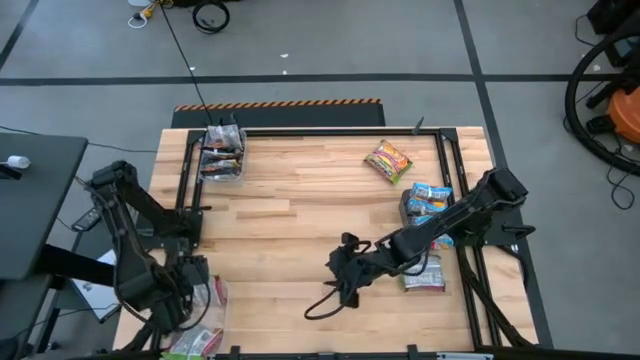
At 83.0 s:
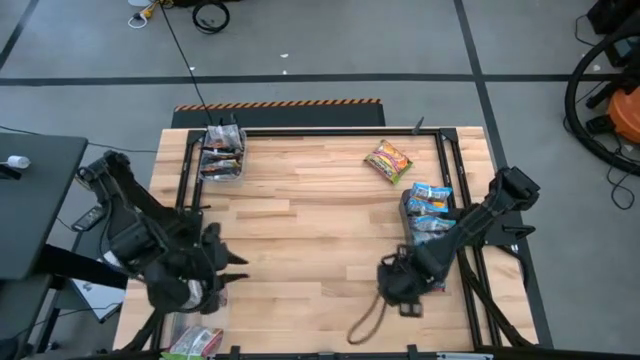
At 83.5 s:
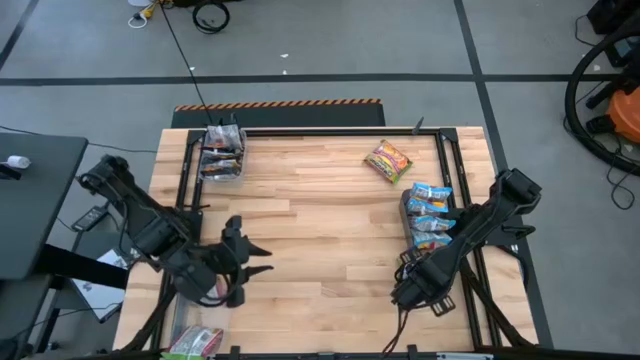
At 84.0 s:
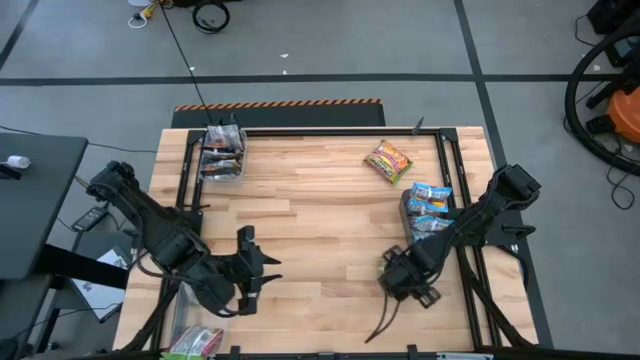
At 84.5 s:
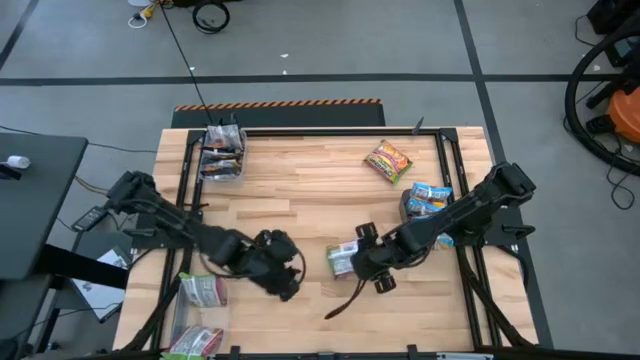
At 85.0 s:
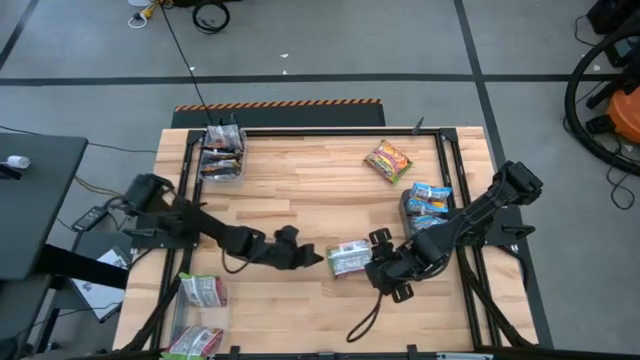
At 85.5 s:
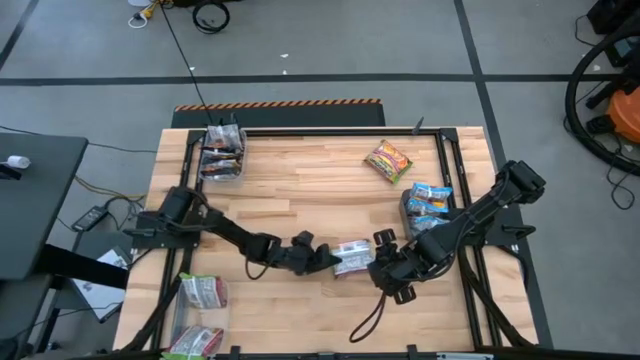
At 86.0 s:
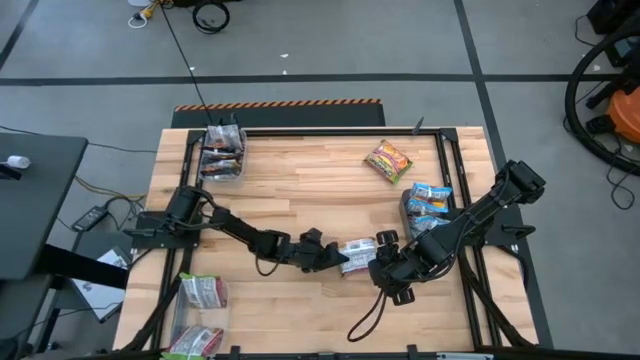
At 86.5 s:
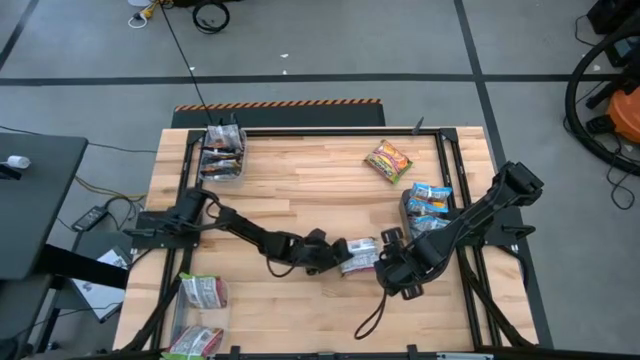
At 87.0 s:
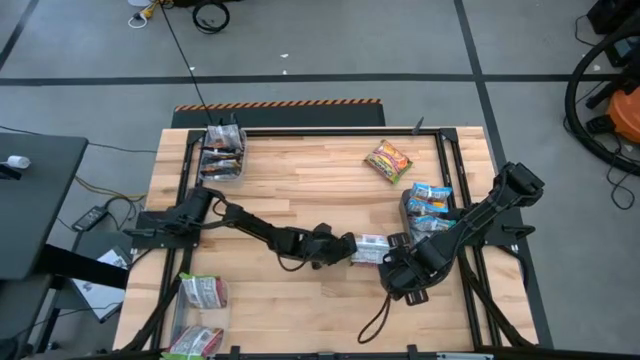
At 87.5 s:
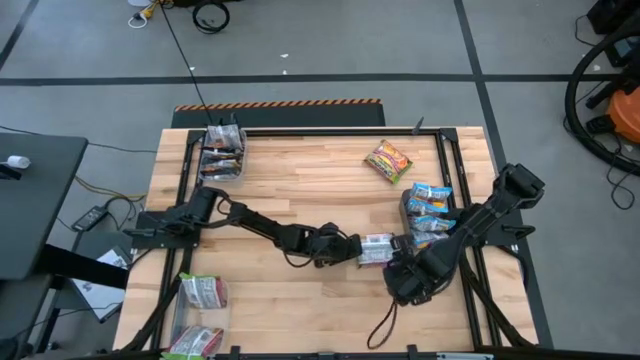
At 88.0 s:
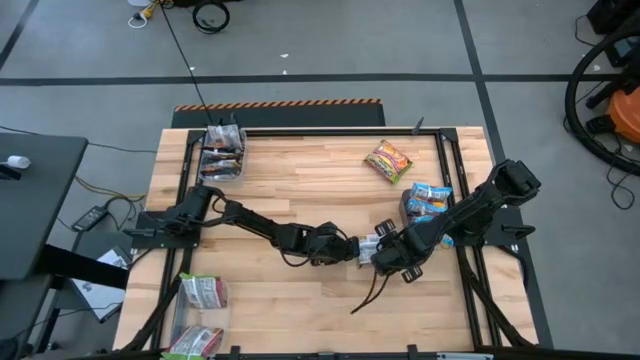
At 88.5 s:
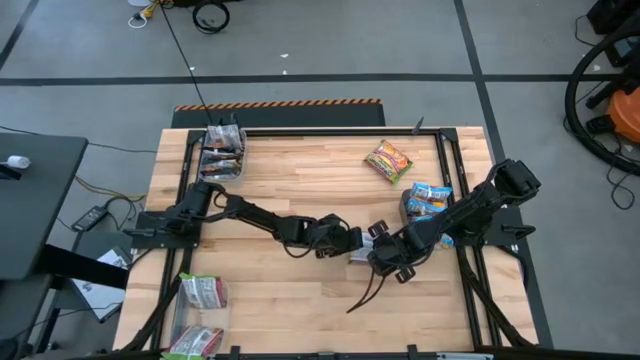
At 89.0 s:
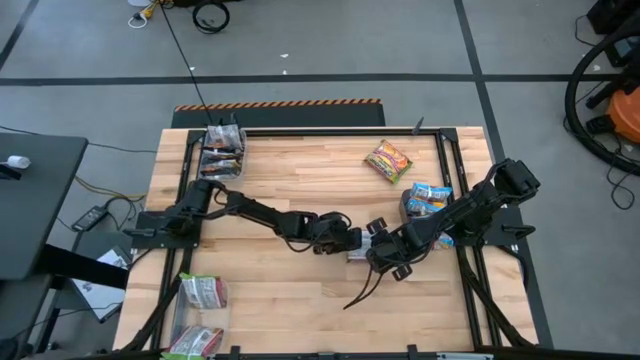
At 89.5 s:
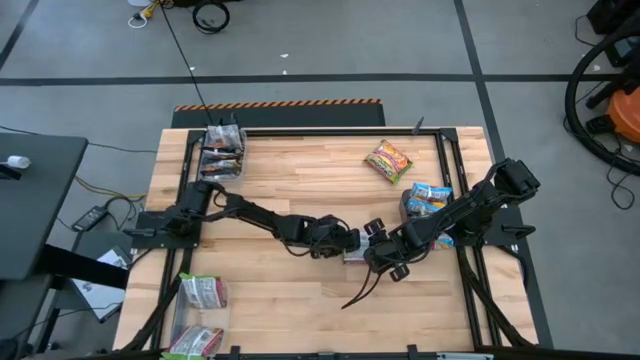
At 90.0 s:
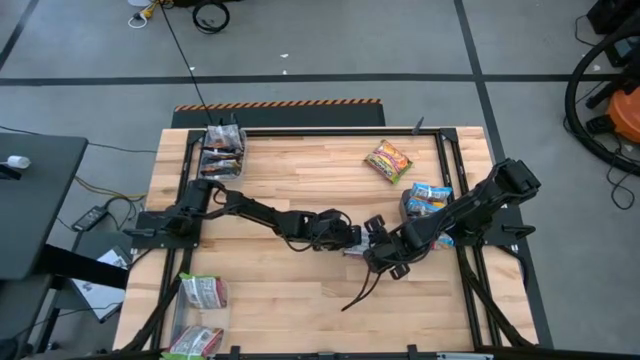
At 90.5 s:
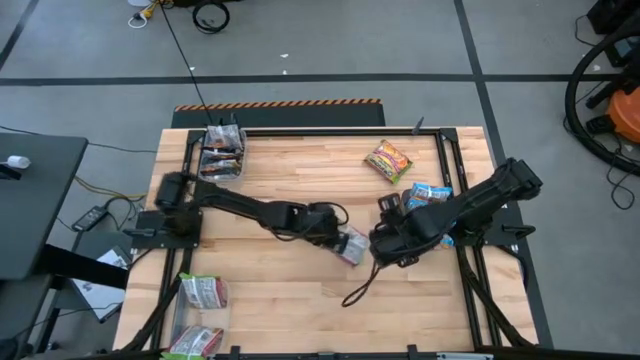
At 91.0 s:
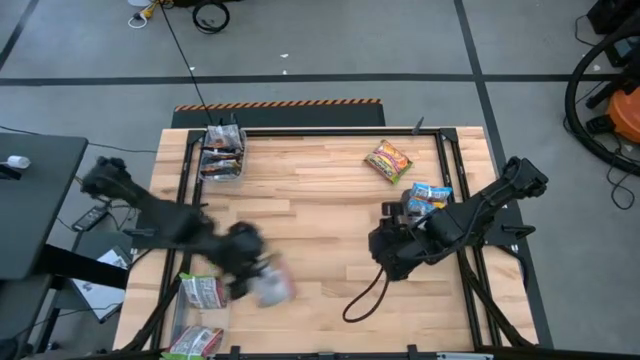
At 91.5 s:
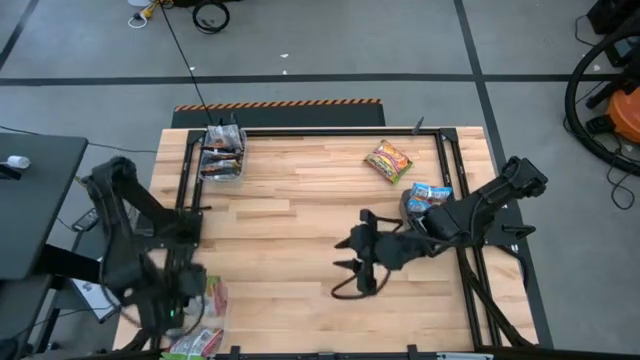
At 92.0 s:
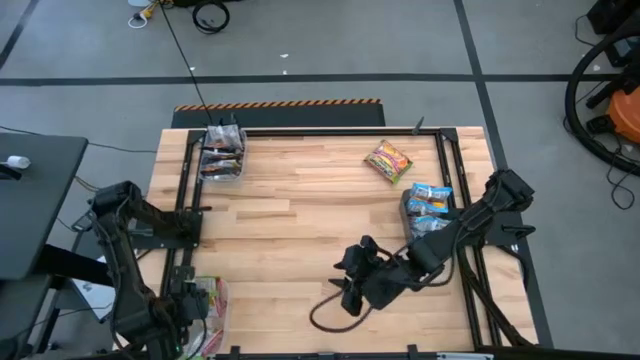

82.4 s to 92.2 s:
Task: Sort Maruchan noodles
Put the green noodle pack into the bottom transparent bin

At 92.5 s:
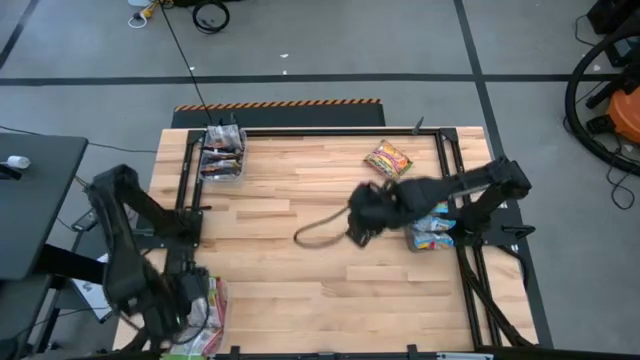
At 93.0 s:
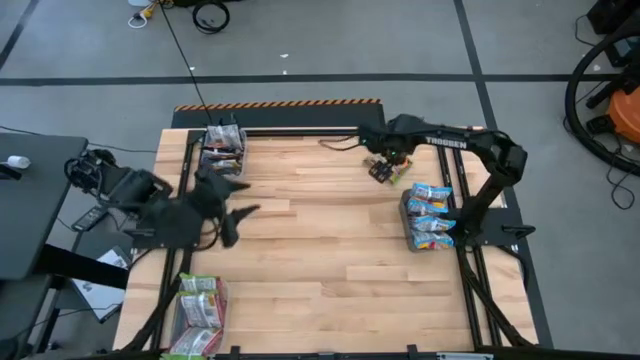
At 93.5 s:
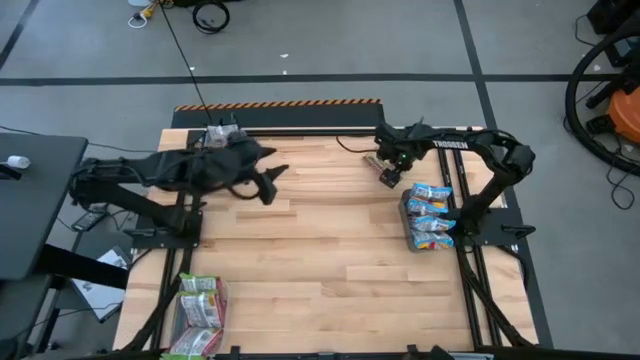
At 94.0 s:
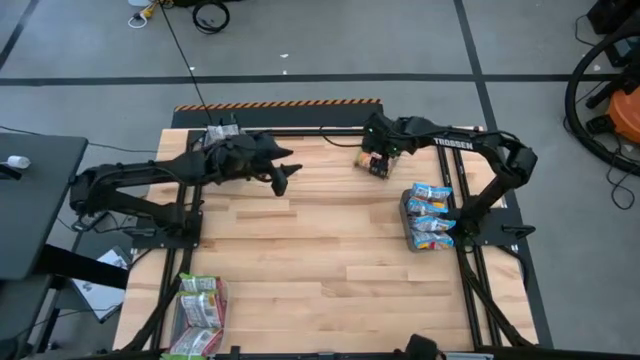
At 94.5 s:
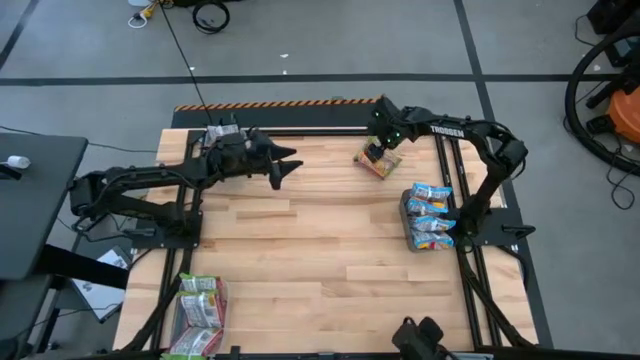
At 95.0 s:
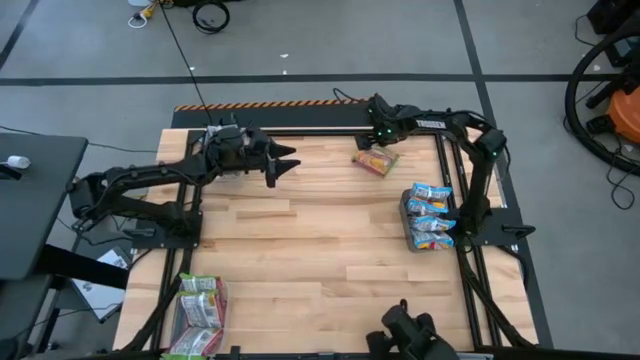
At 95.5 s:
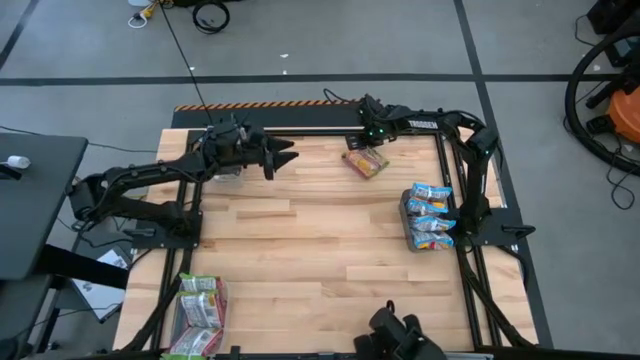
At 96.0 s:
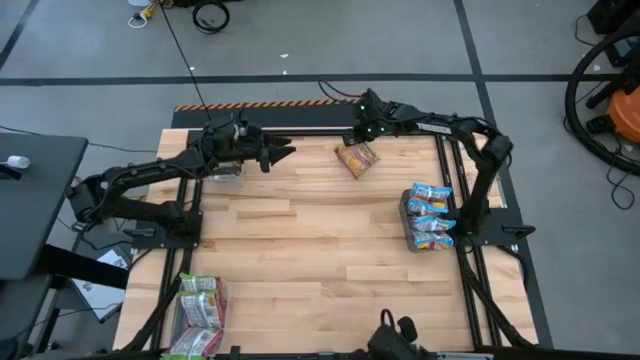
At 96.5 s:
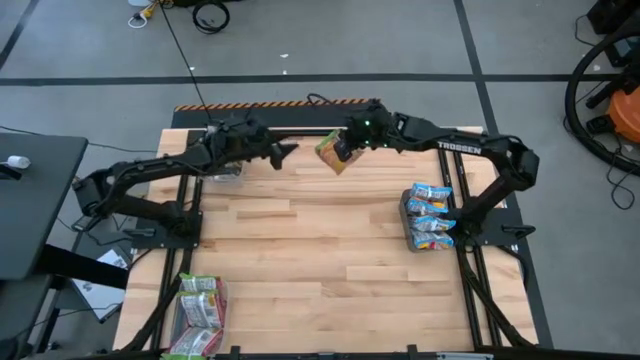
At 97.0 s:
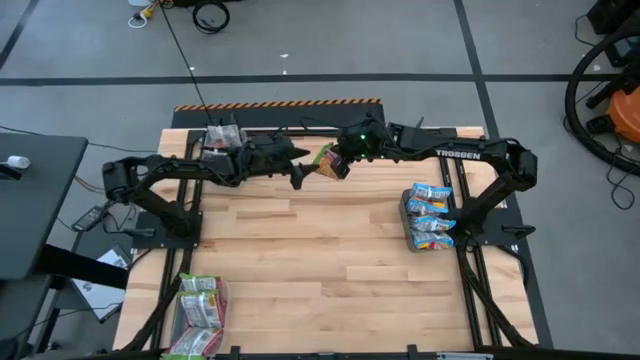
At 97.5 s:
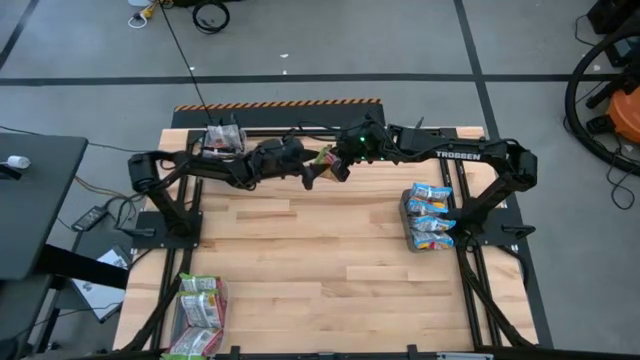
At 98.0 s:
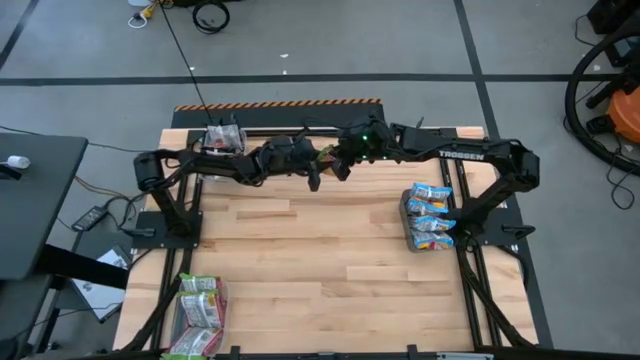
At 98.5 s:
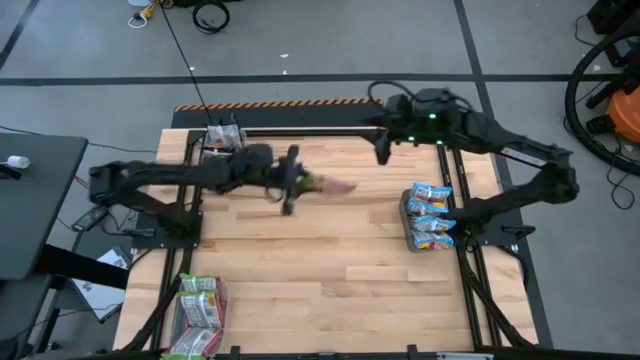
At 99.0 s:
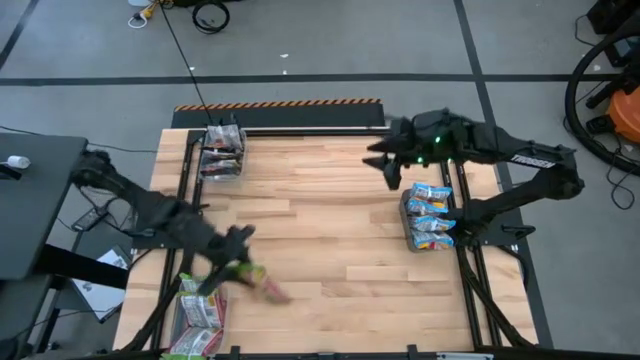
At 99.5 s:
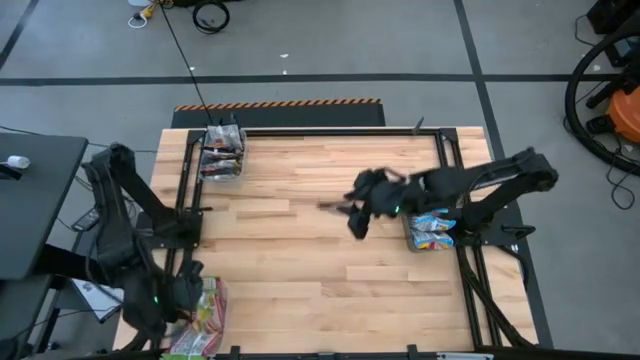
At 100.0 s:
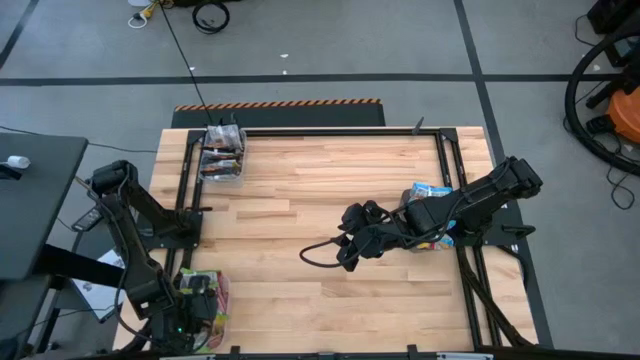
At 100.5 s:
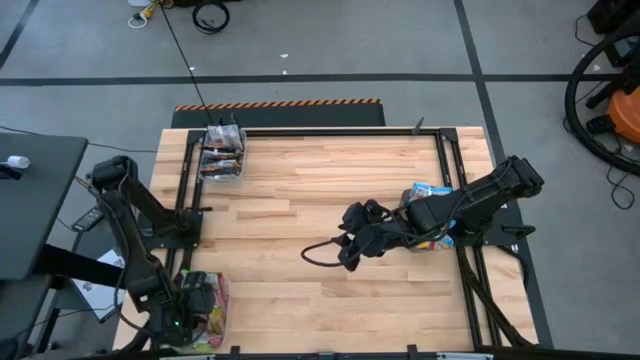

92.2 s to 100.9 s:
Put the green noodle pack into the bottom transparent bin

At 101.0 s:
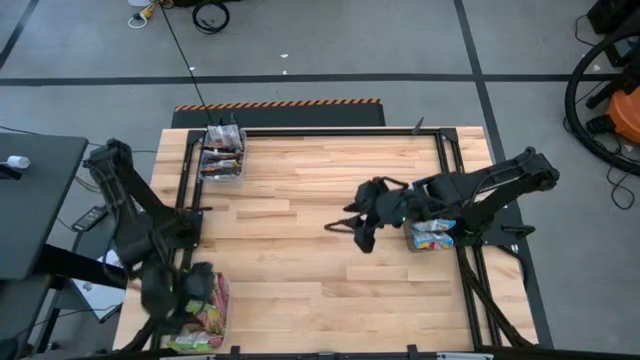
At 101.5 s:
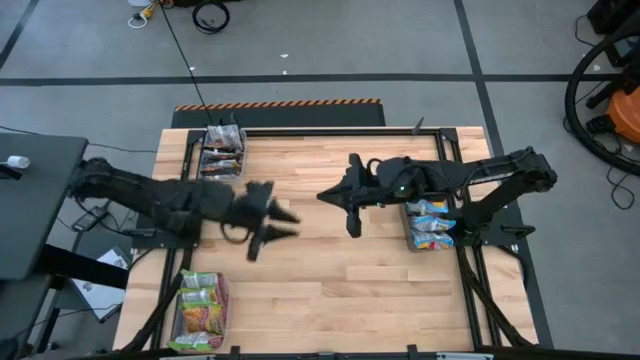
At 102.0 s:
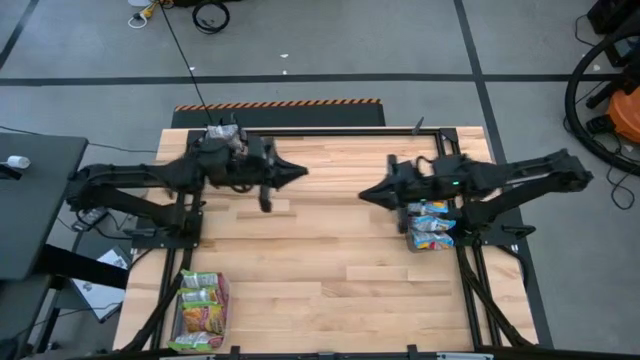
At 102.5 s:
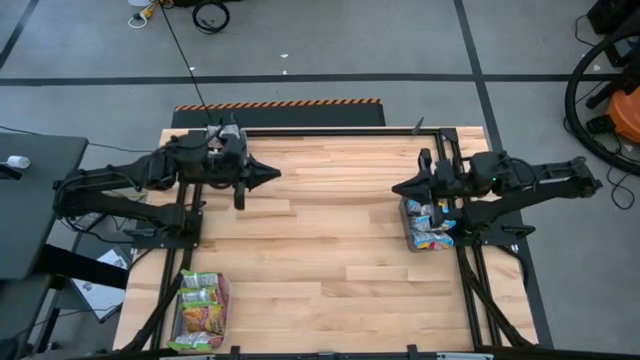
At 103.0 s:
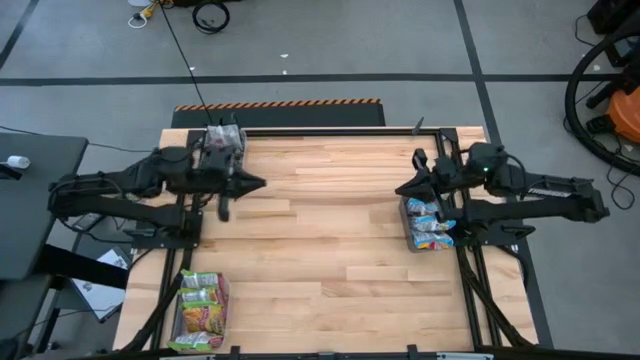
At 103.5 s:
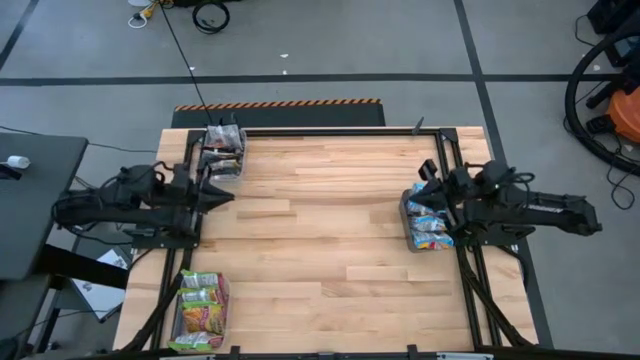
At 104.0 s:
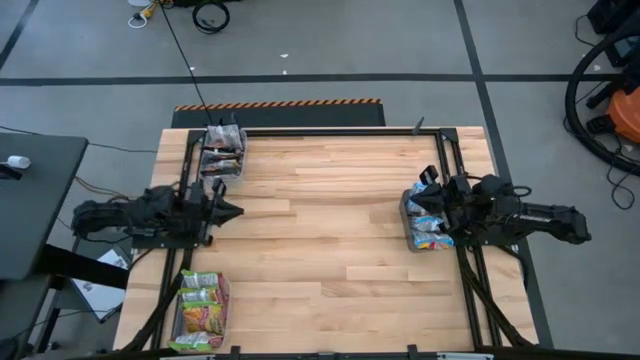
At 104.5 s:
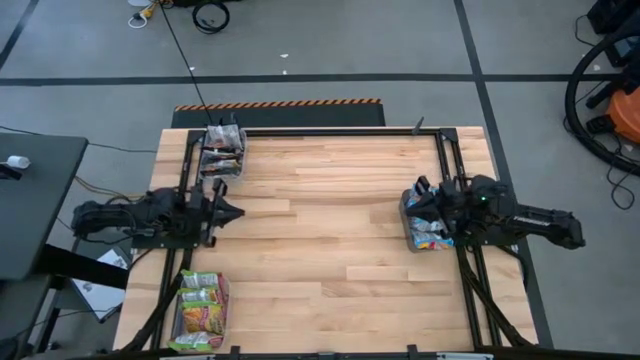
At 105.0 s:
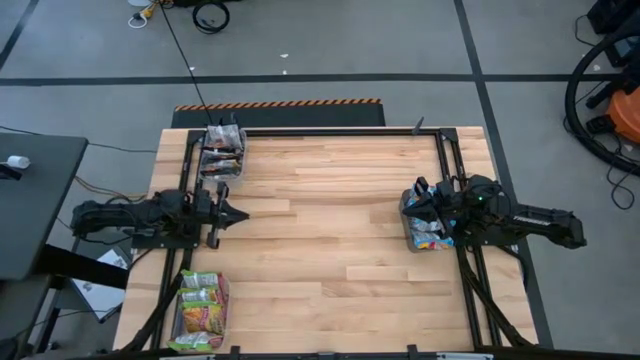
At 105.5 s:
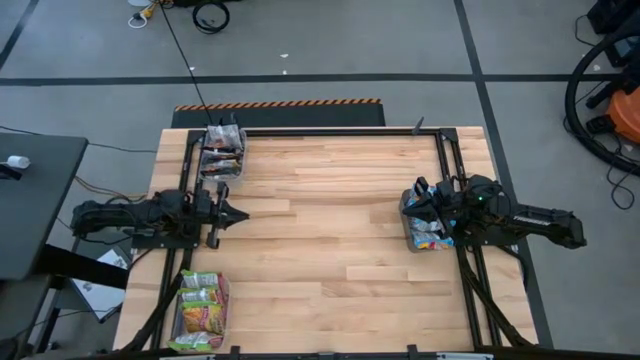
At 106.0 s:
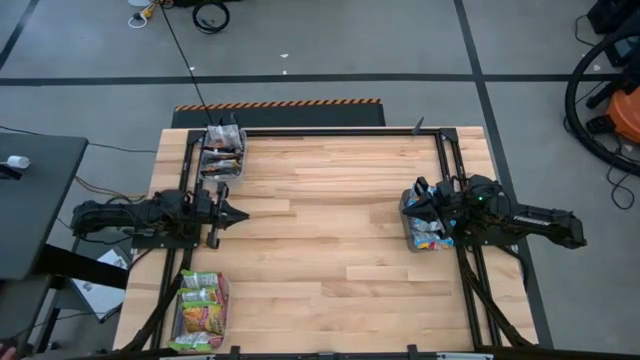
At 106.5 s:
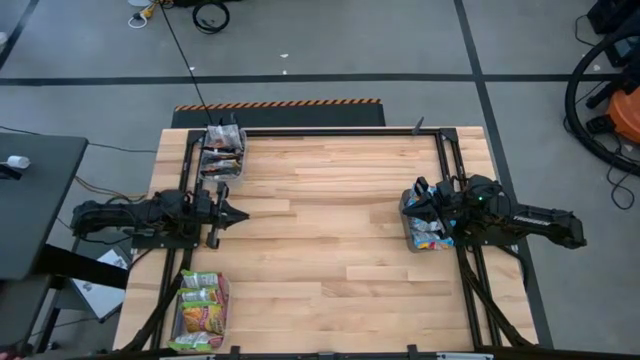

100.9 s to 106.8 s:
Return to Home Position
